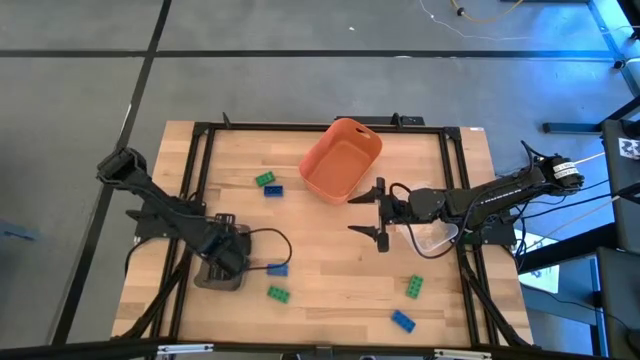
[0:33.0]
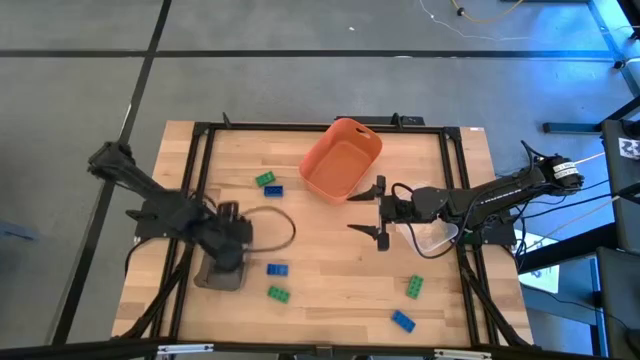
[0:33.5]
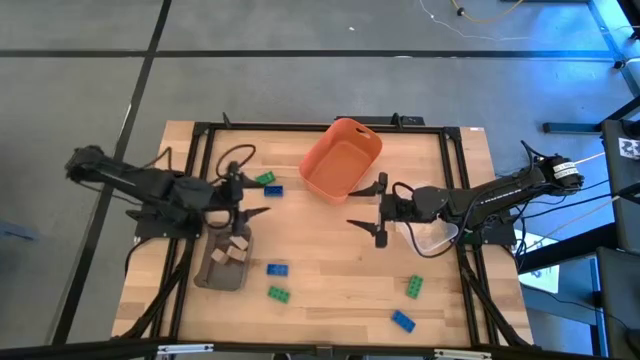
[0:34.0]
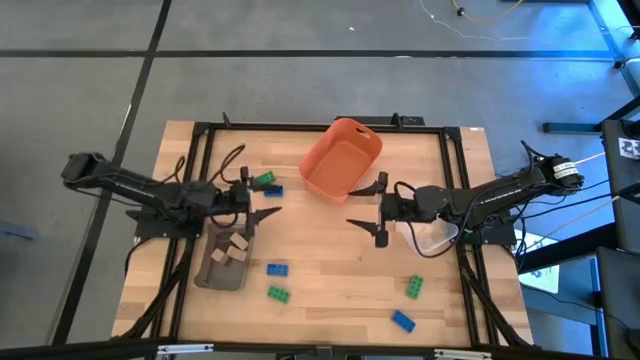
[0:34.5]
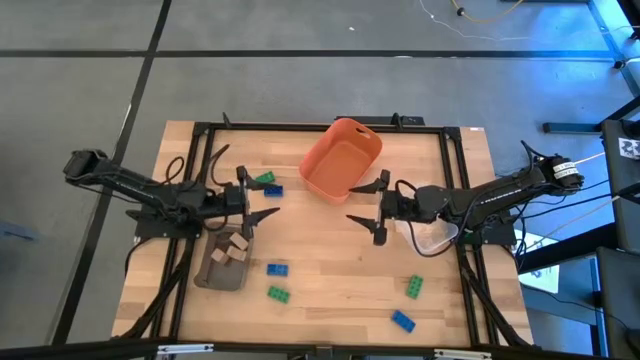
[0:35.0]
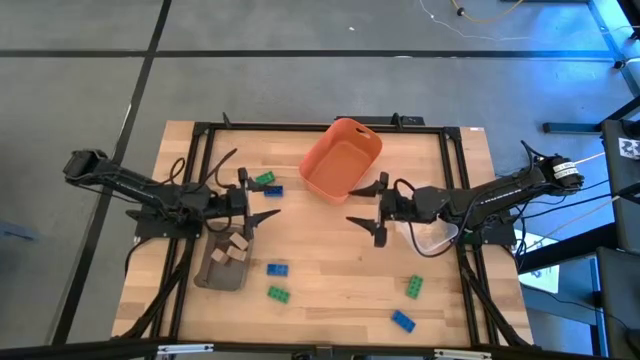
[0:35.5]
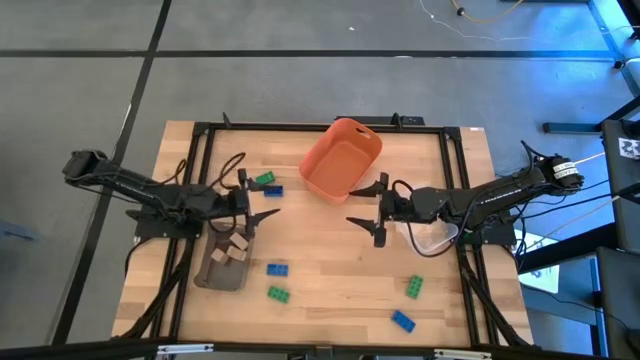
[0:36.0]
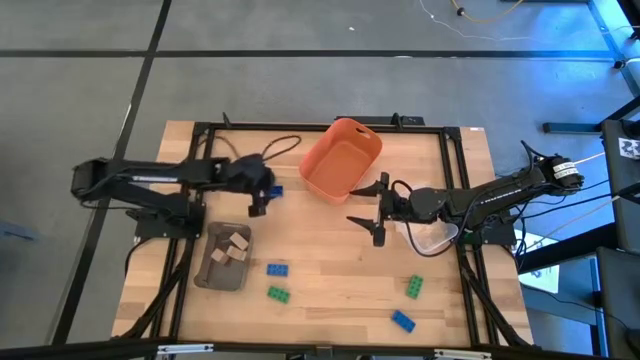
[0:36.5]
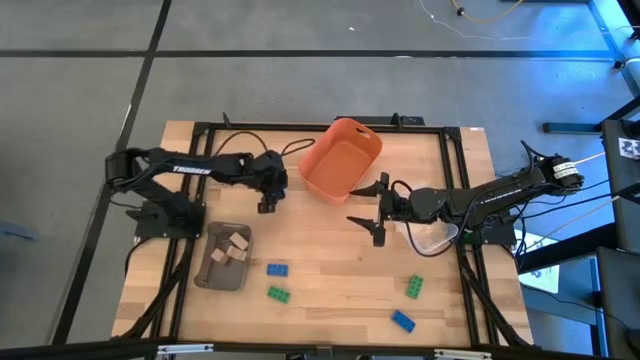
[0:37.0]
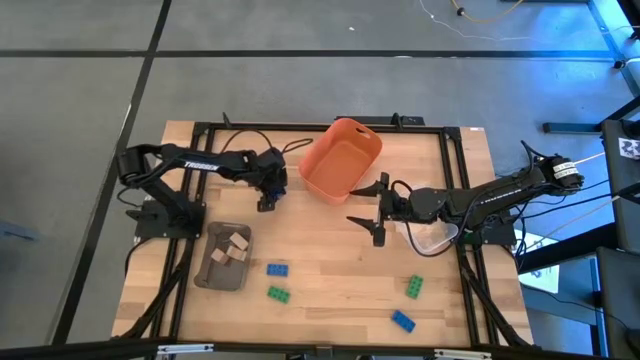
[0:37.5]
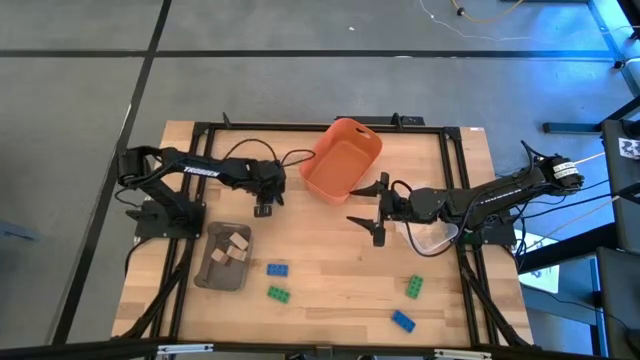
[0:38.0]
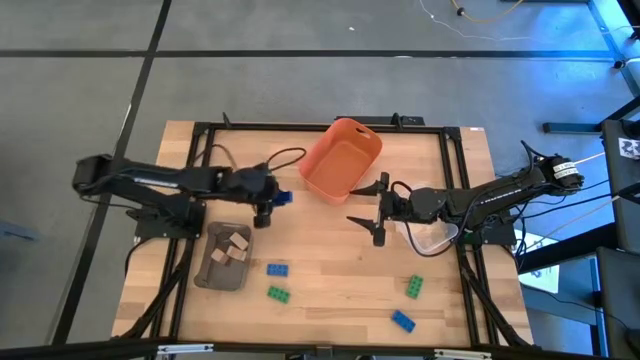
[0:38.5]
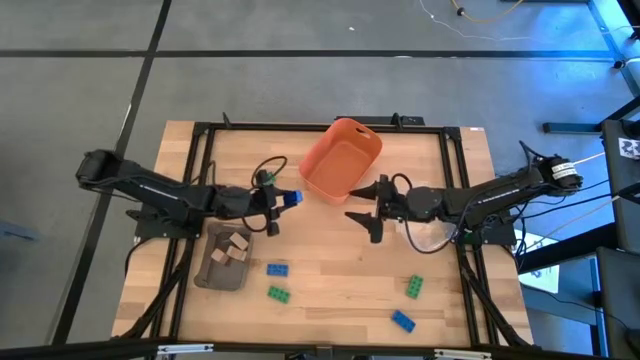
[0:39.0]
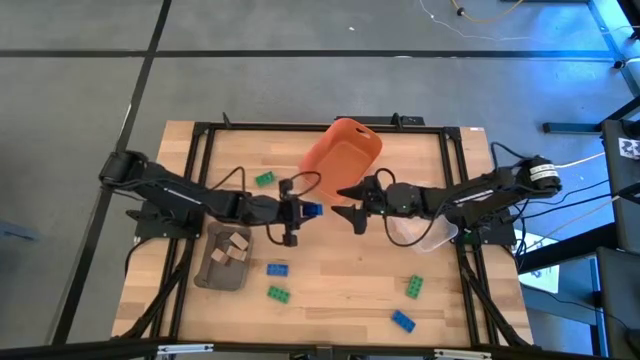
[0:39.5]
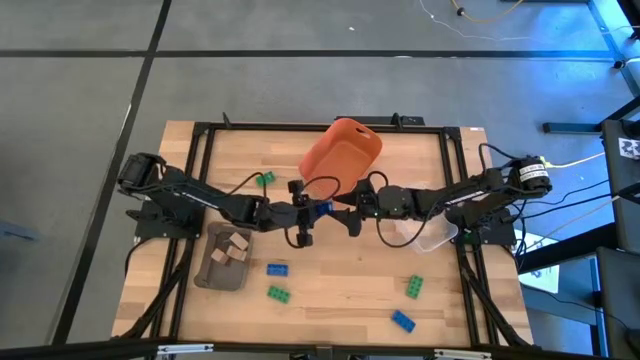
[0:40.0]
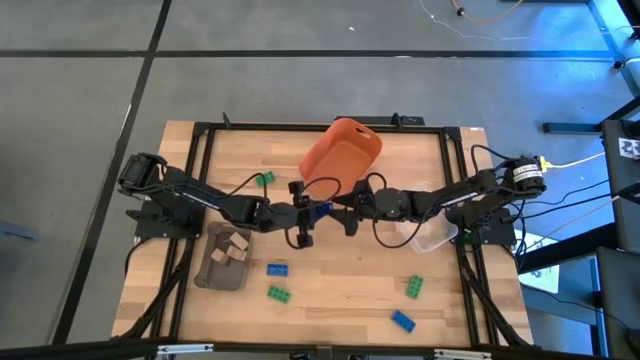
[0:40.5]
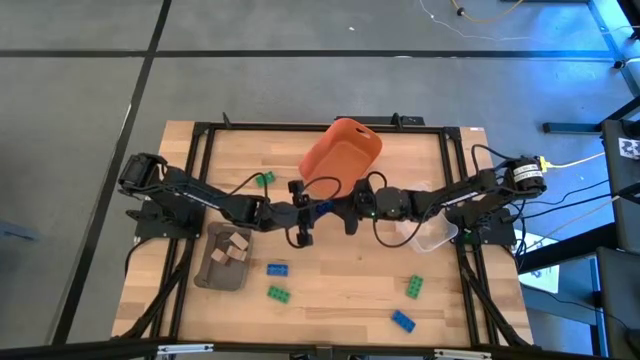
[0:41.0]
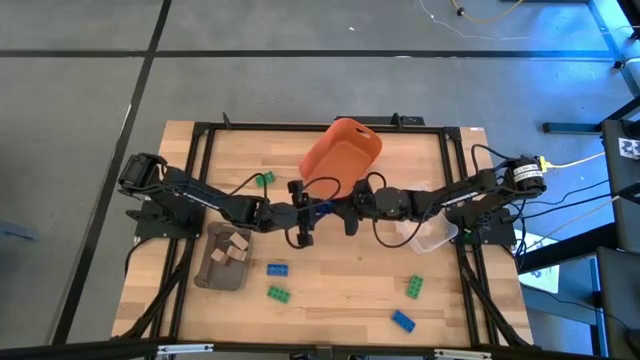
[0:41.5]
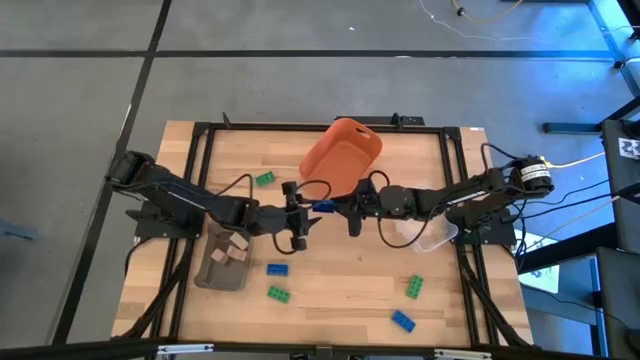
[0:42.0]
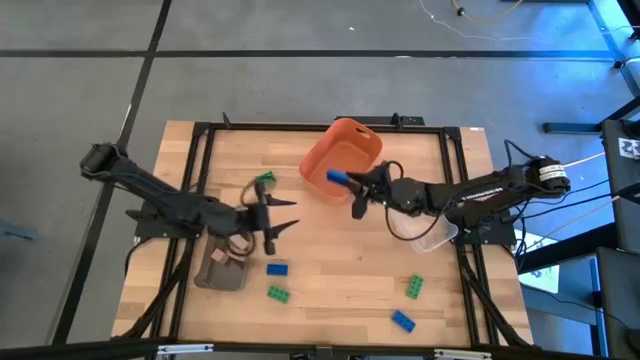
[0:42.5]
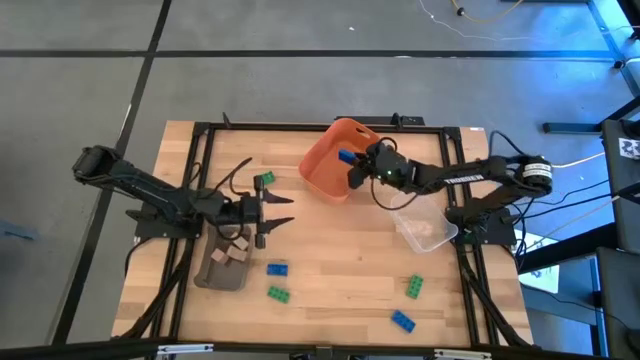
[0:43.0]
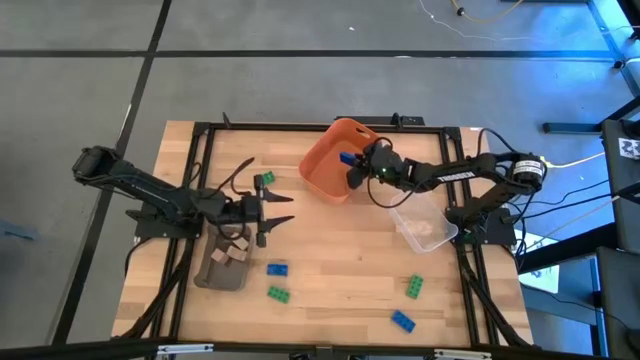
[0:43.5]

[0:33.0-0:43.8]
Task: Sort & place blocks by color
Put the top blue game piece into the orange bin

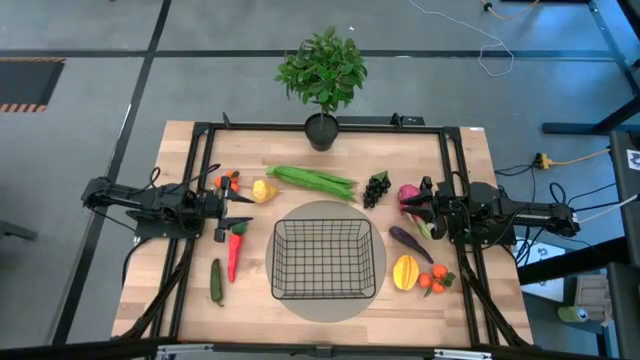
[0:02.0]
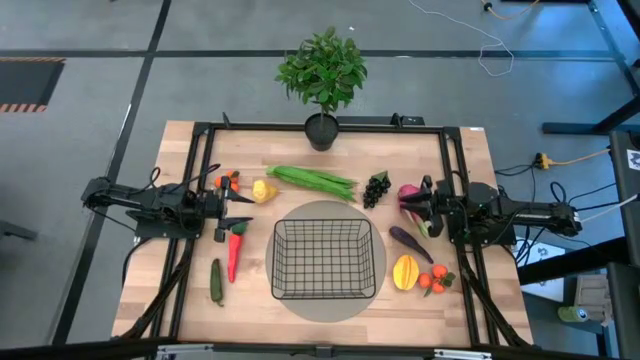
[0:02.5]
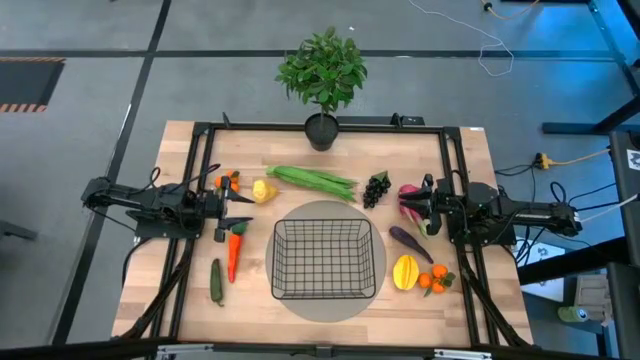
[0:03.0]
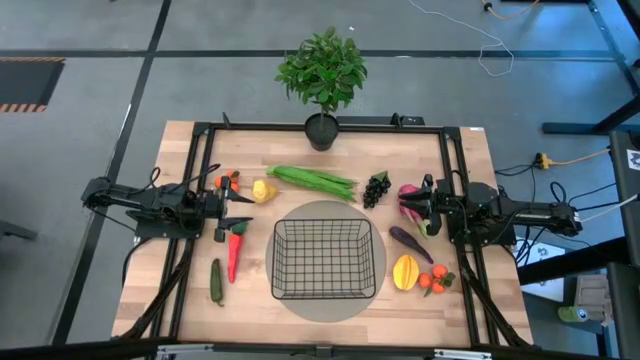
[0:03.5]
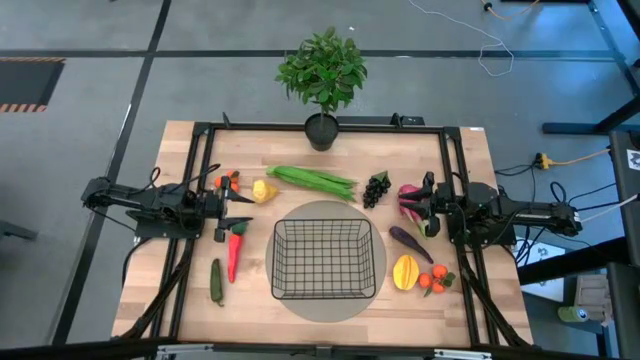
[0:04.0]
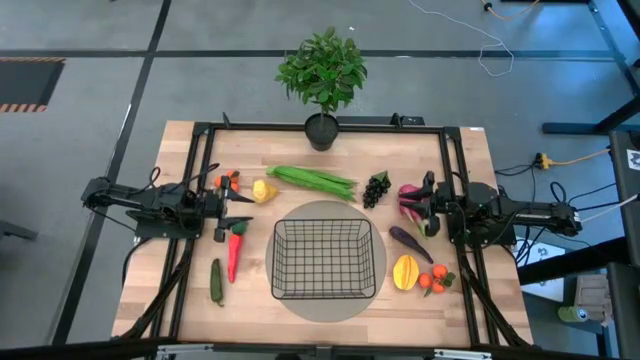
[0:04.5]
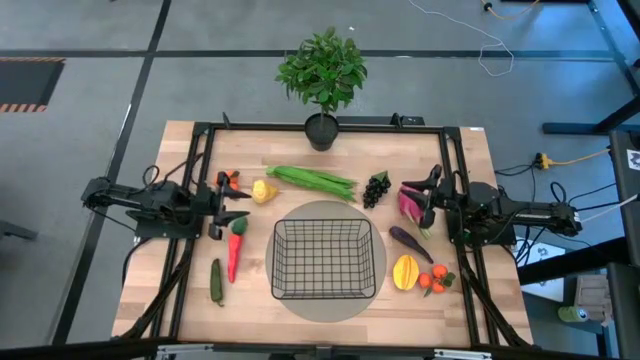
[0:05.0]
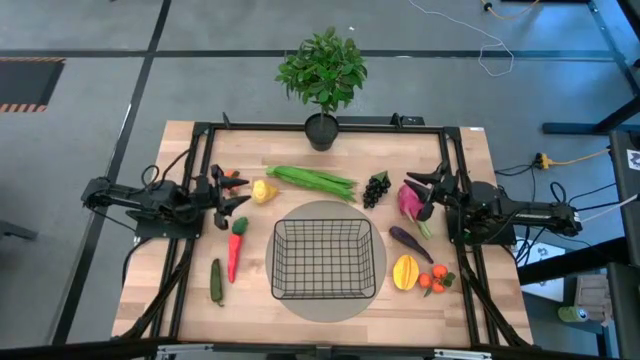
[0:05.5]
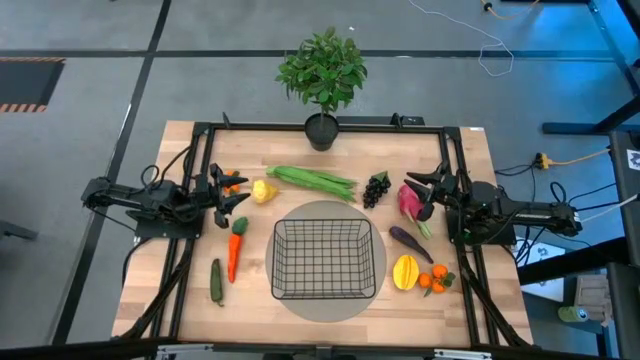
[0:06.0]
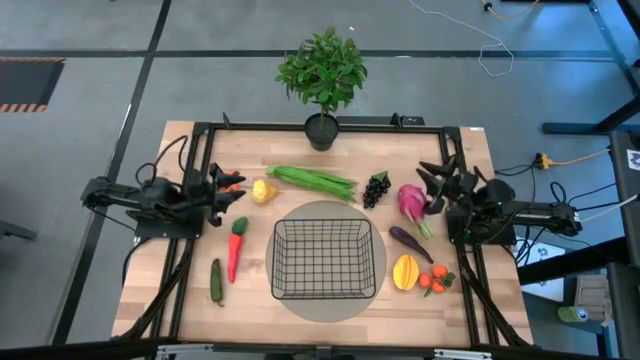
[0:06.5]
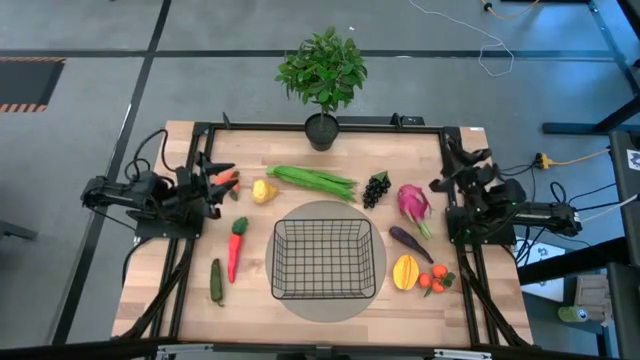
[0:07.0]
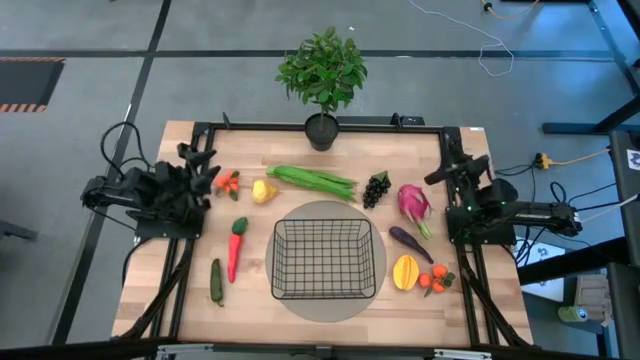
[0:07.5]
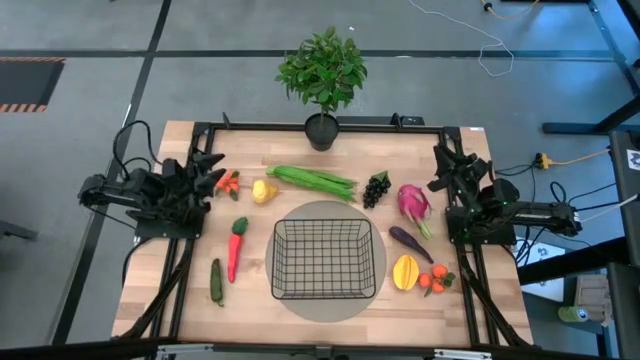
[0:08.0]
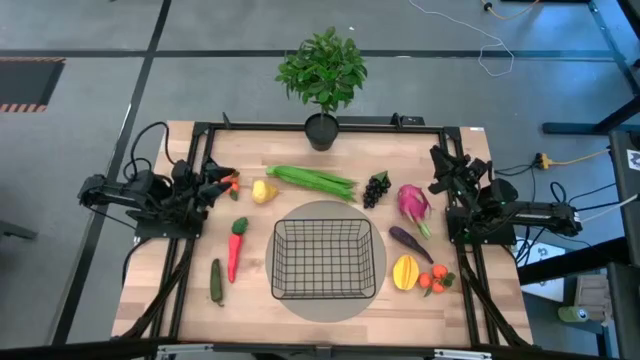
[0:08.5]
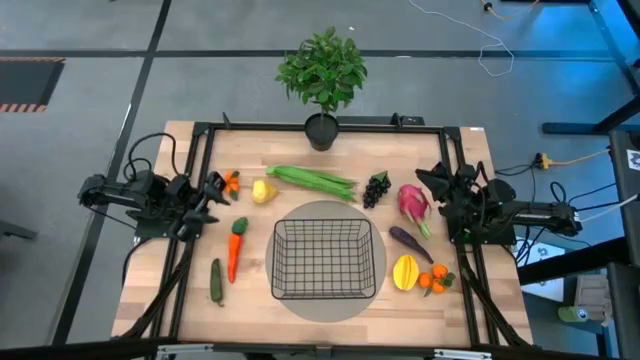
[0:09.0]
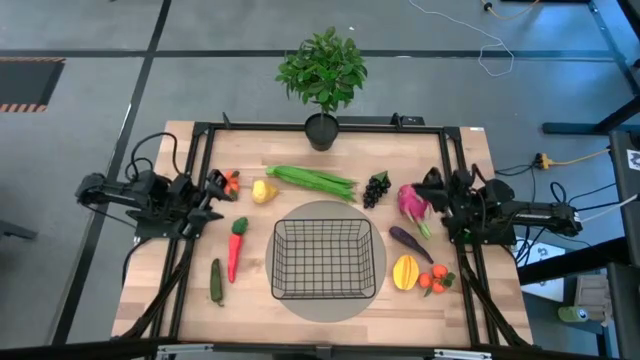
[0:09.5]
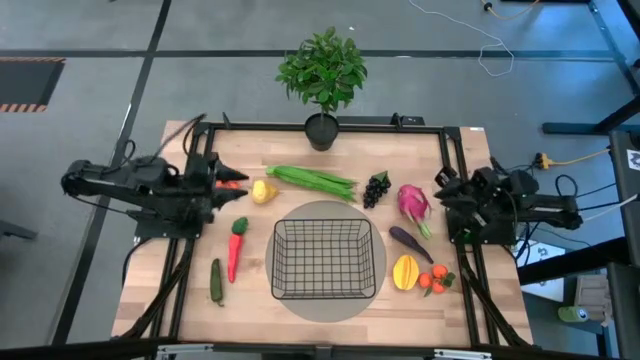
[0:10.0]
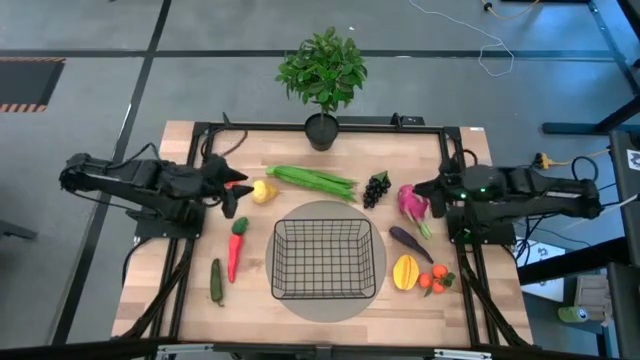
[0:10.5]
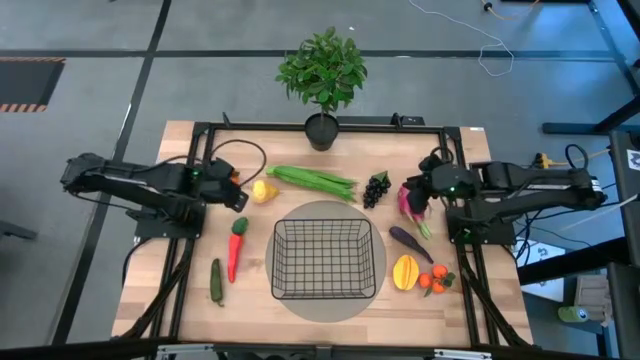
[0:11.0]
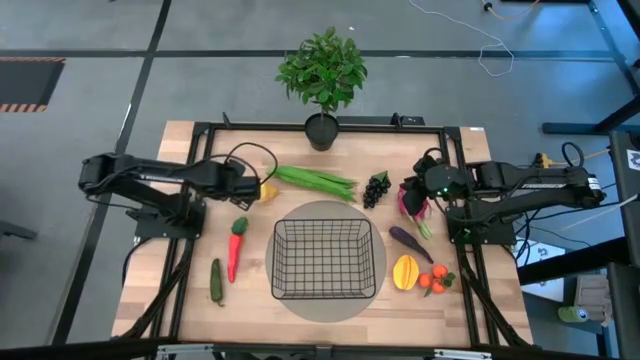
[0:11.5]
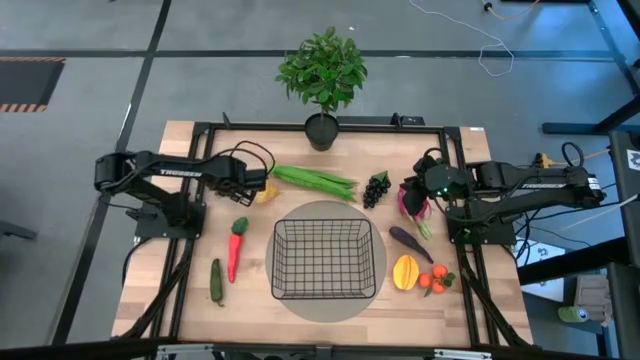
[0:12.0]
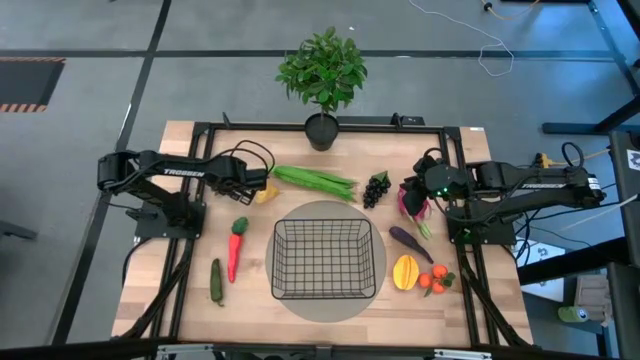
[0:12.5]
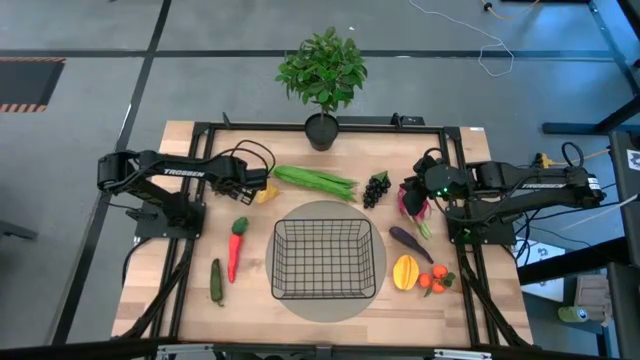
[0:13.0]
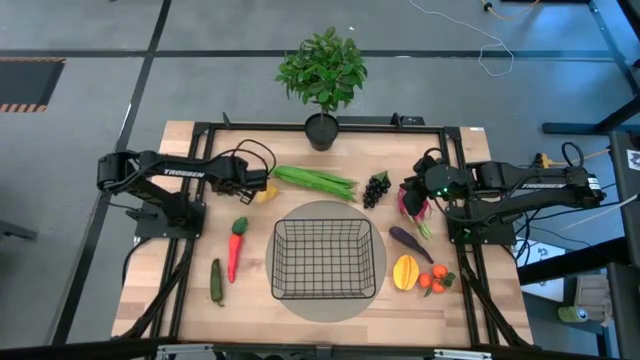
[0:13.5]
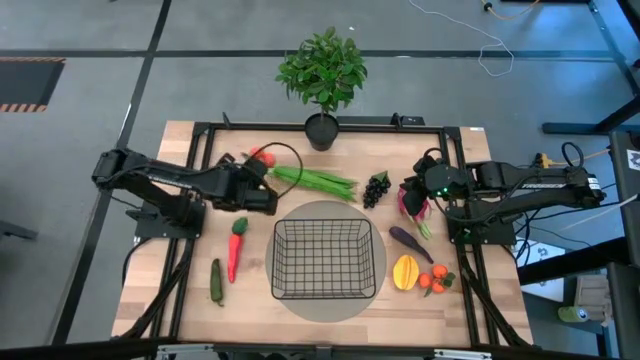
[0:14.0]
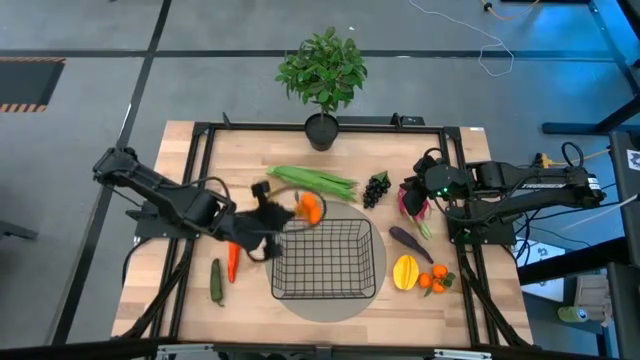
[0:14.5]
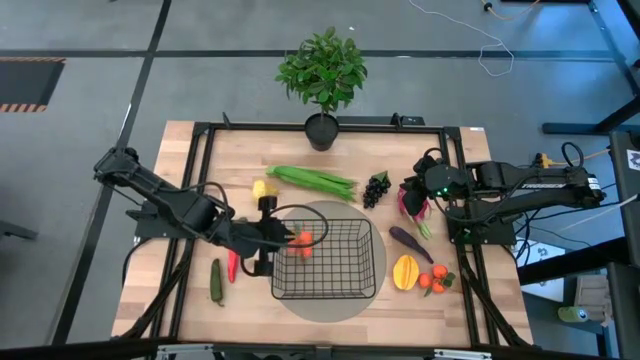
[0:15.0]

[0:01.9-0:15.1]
Task: Build produce basket
Put the top tangerines into the black wire basket
